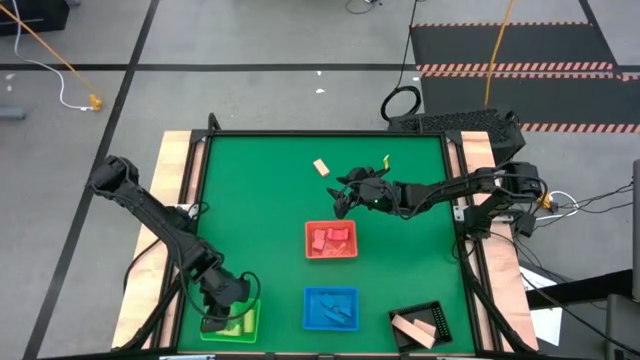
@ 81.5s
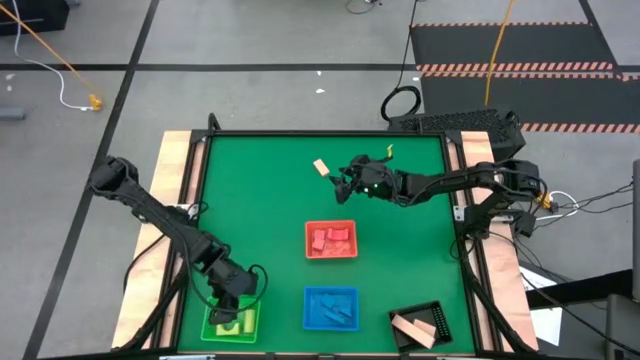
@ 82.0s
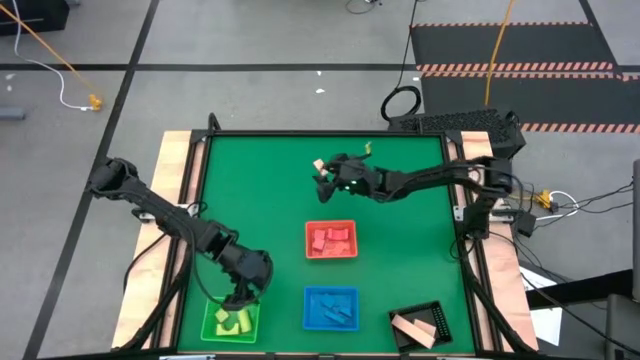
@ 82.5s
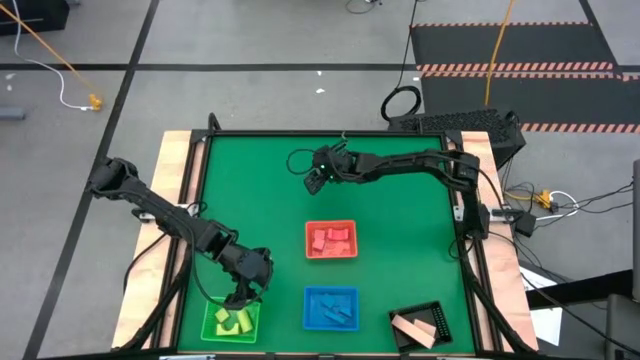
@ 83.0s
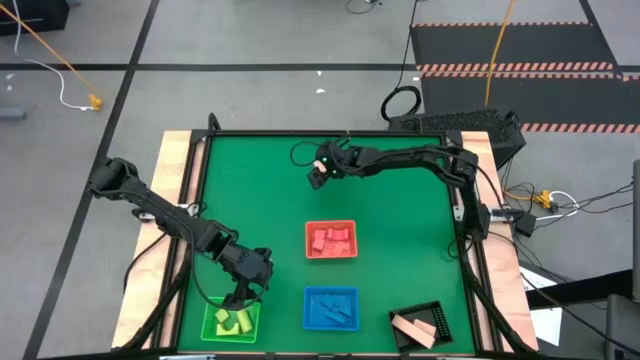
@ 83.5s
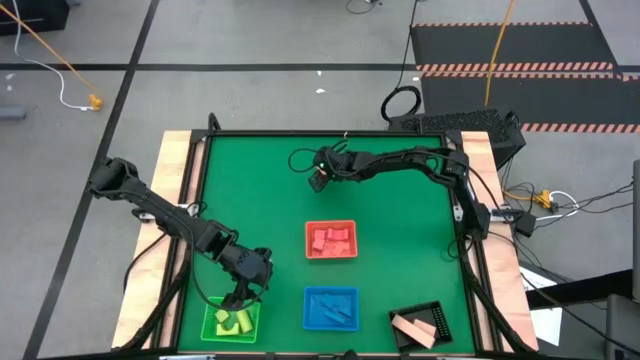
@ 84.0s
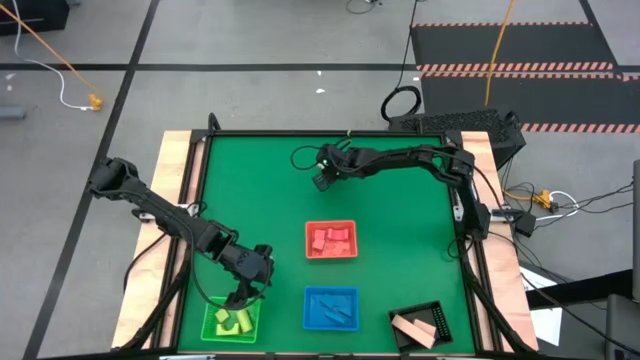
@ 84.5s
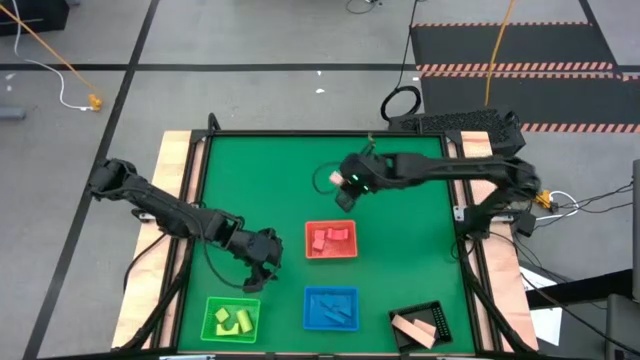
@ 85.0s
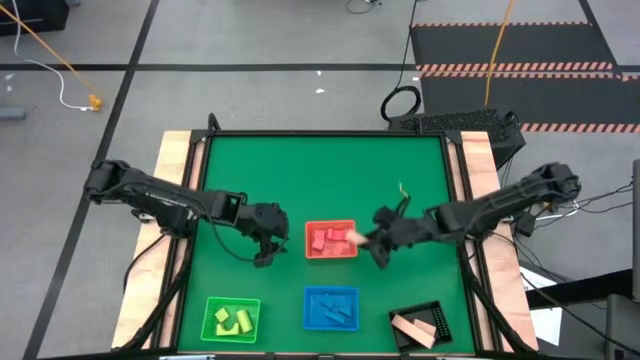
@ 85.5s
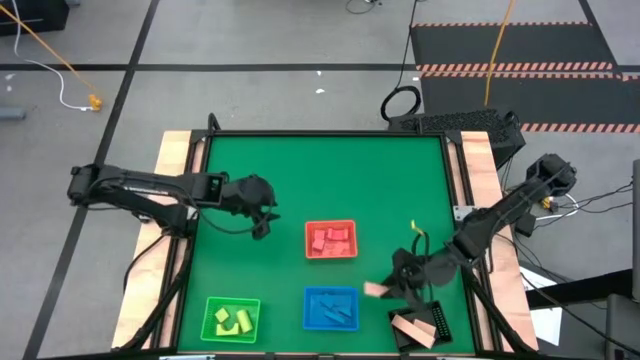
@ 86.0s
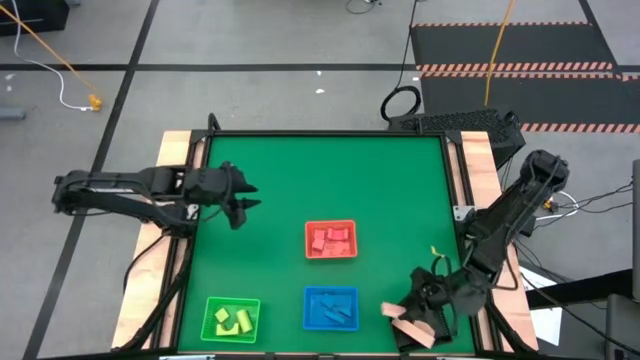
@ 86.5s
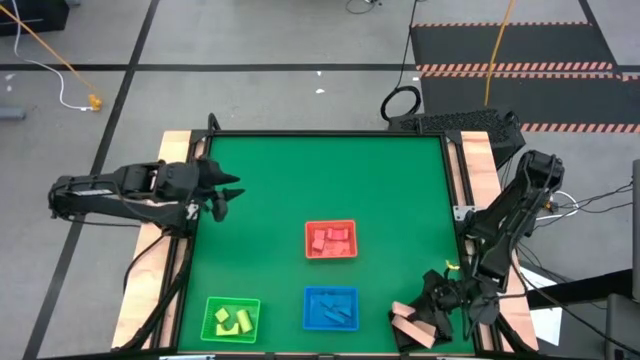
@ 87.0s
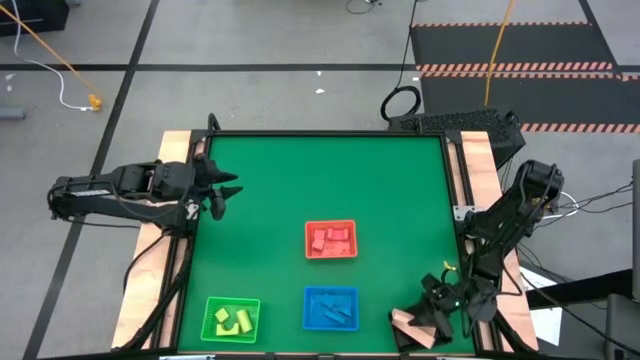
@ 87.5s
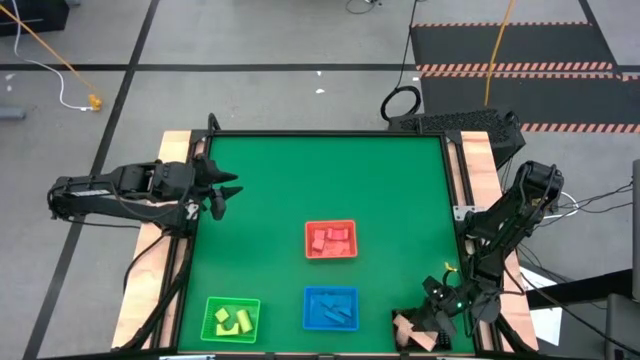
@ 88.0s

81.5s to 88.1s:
Task: Sort & place blocks by color
Put the brown block into the black bin

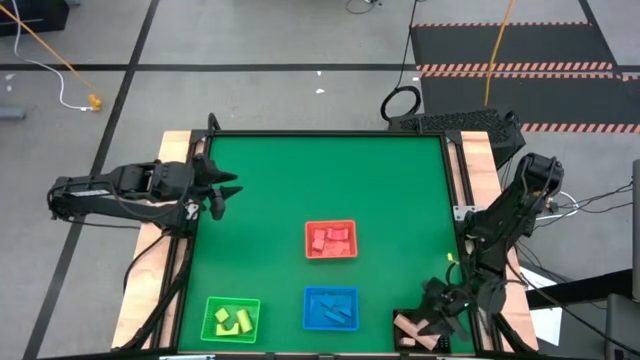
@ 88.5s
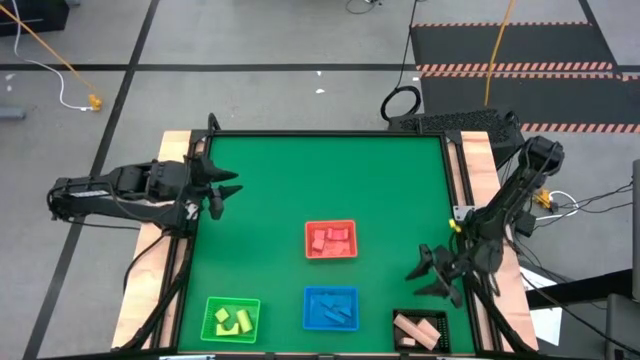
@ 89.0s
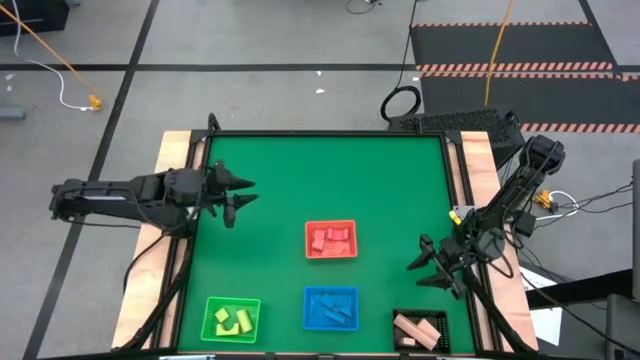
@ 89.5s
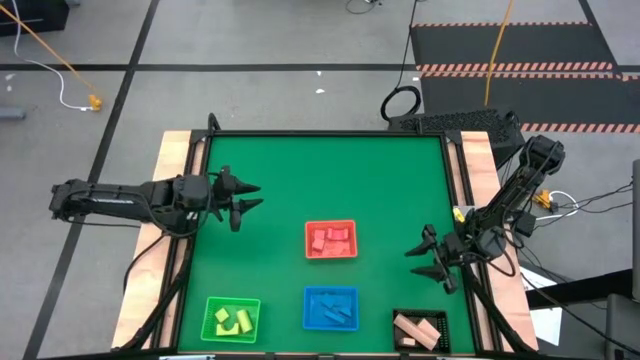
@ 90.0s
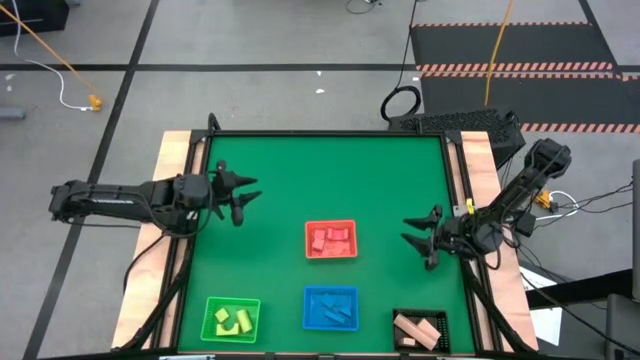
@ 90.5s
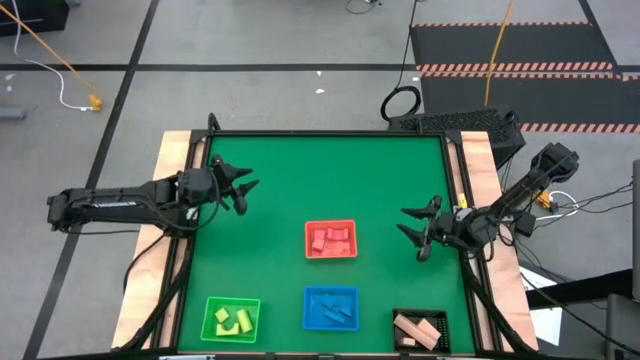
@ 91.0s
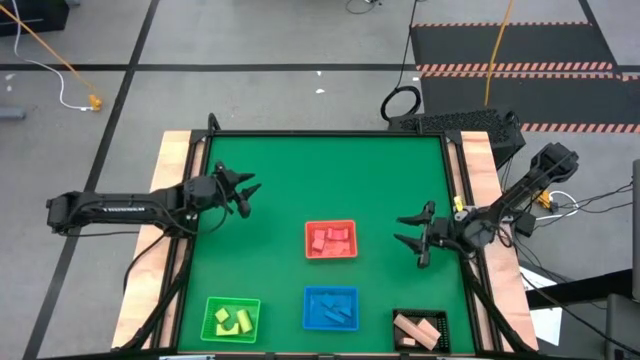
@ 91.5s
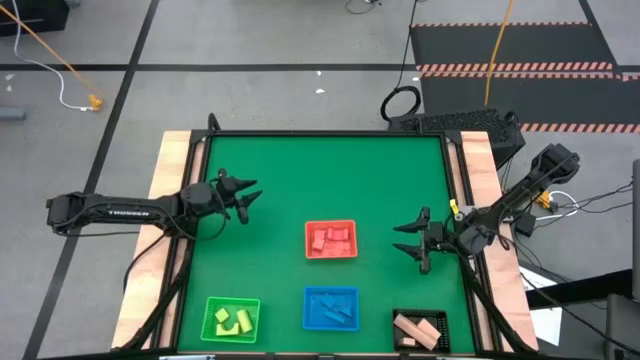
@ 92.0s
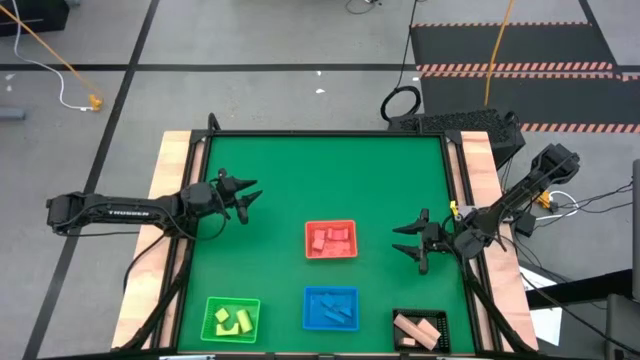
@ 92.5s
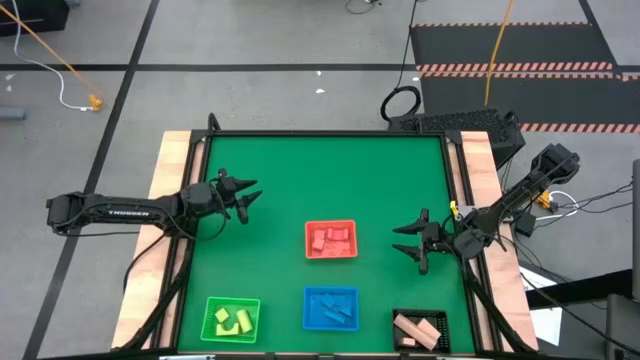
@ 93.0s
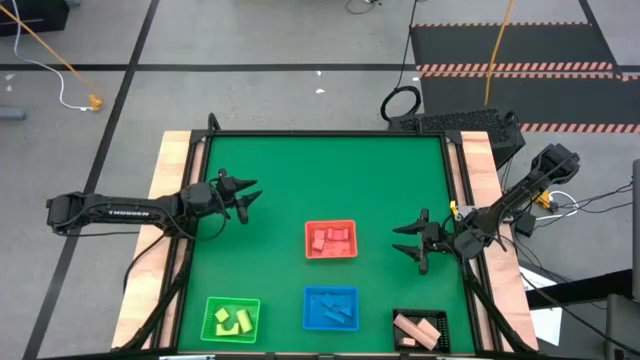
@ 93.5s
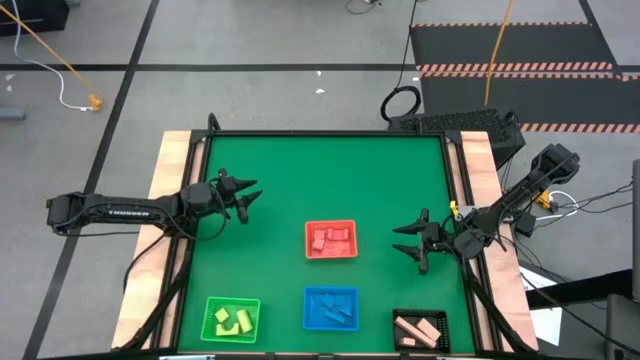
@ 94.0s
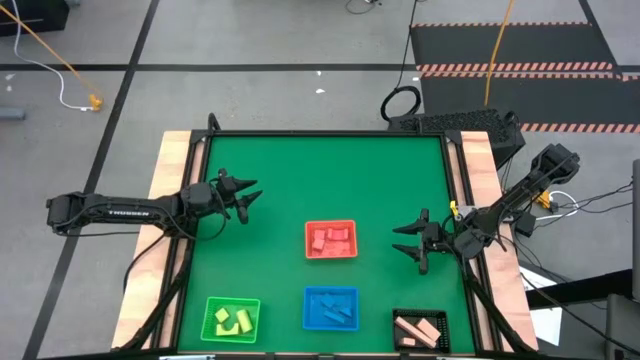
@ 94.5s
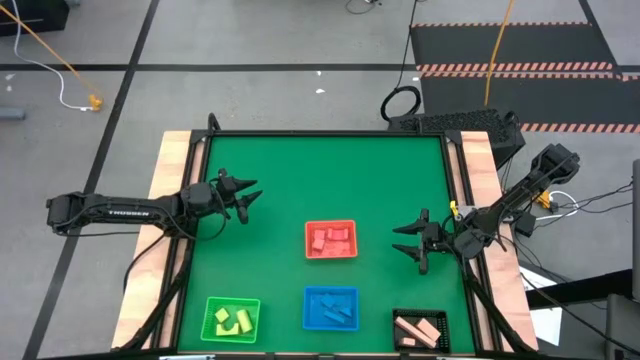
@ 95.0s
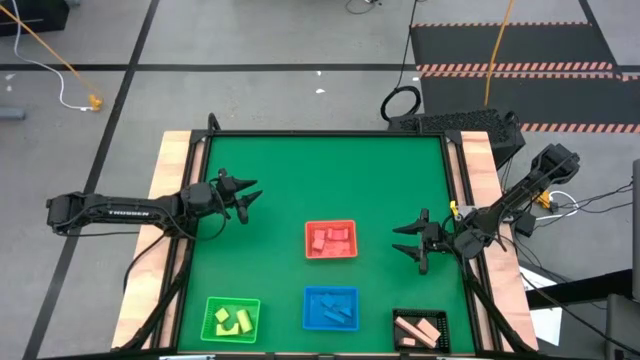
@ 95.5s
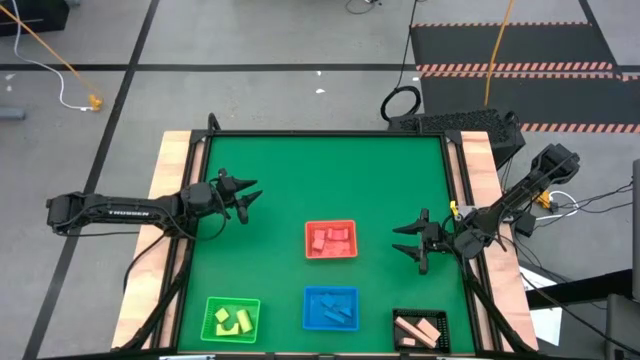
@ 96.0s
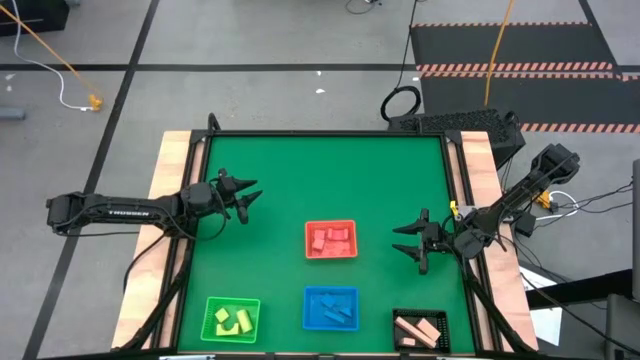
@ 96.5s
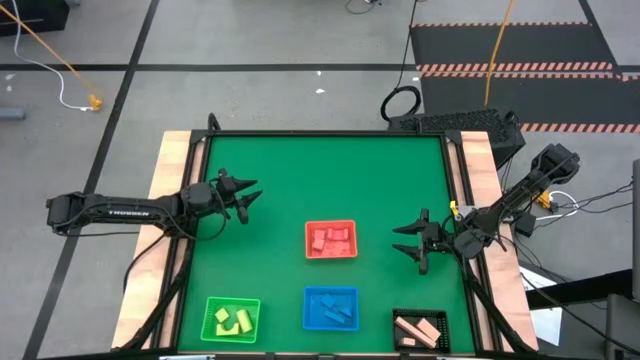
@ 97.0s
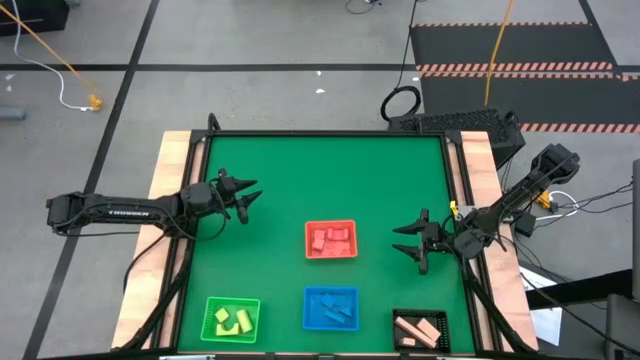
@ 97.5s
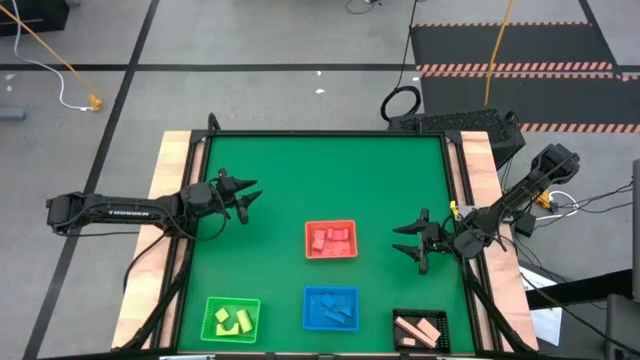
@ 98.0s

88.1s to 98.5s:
Return to Home Position

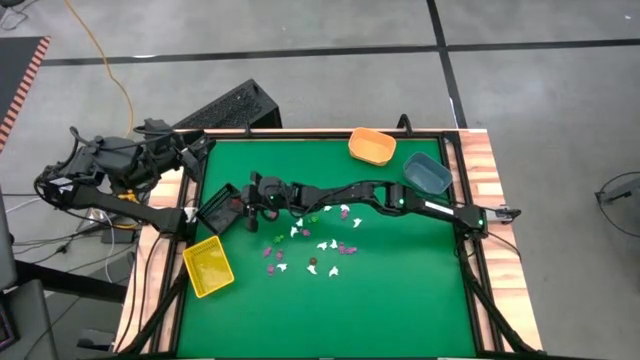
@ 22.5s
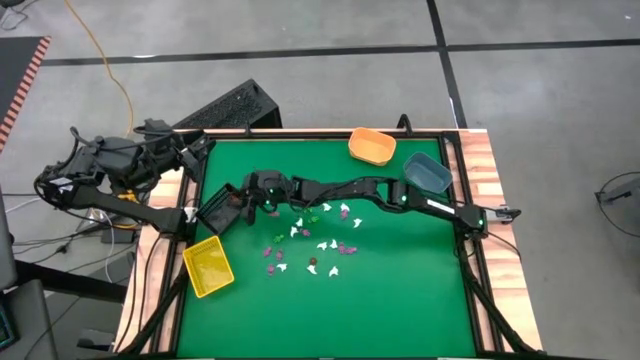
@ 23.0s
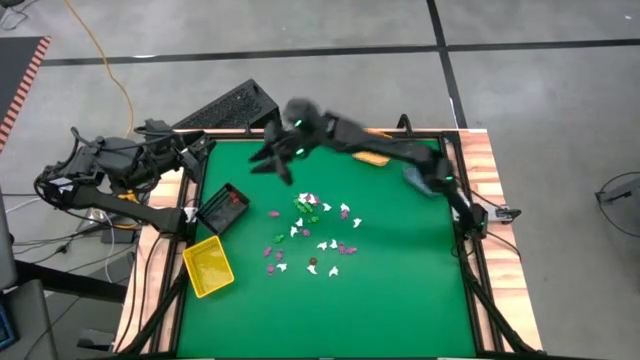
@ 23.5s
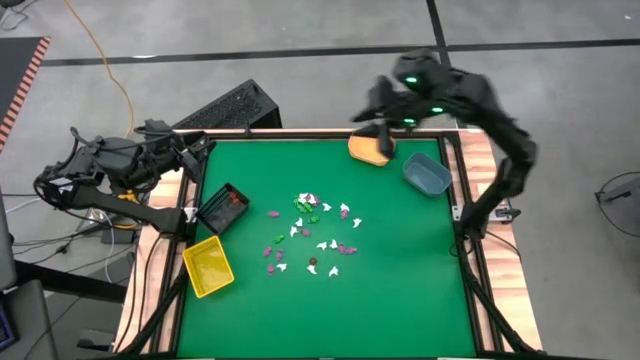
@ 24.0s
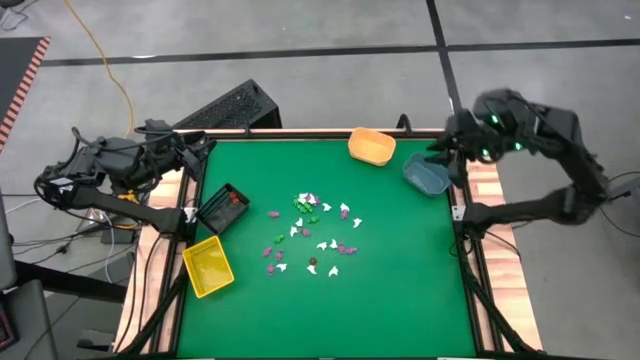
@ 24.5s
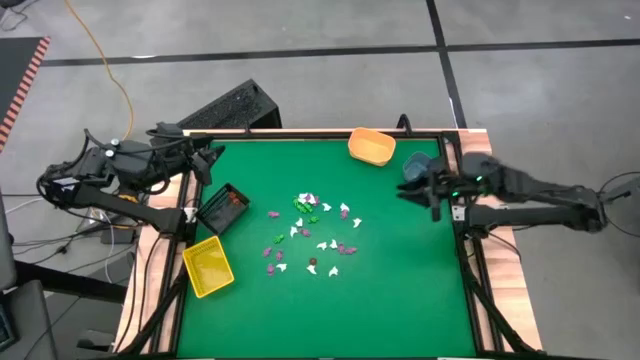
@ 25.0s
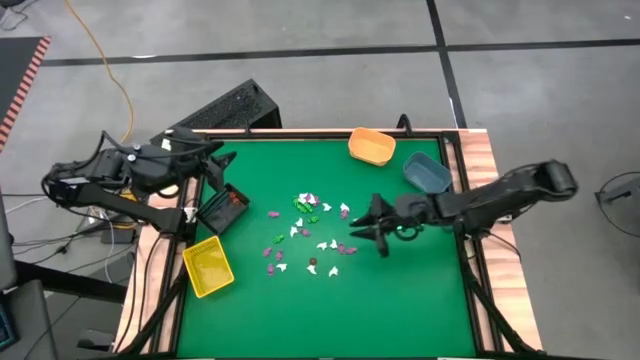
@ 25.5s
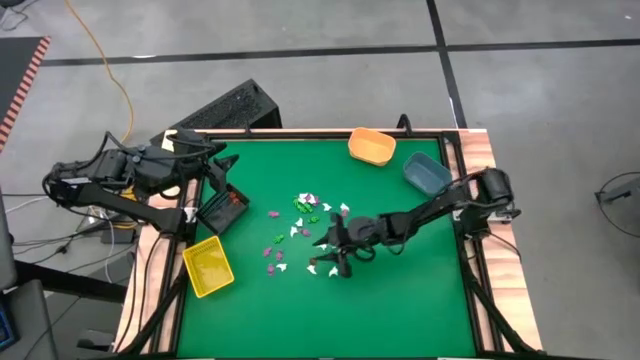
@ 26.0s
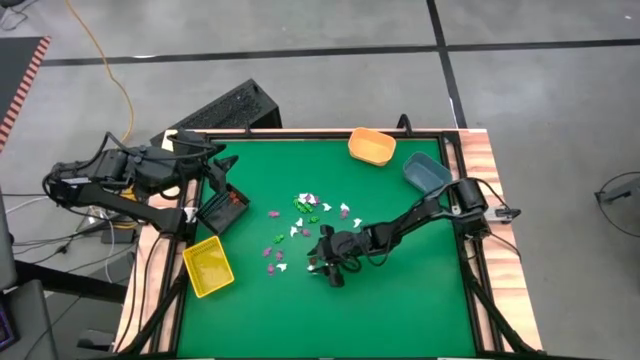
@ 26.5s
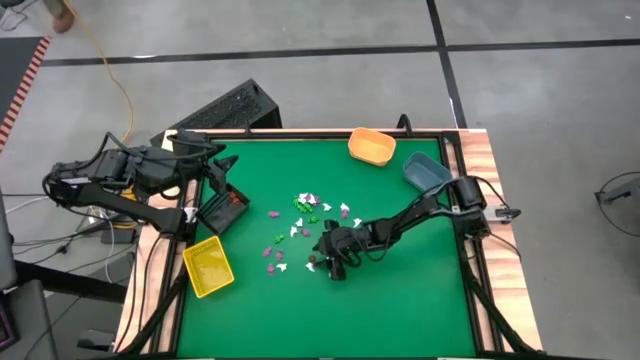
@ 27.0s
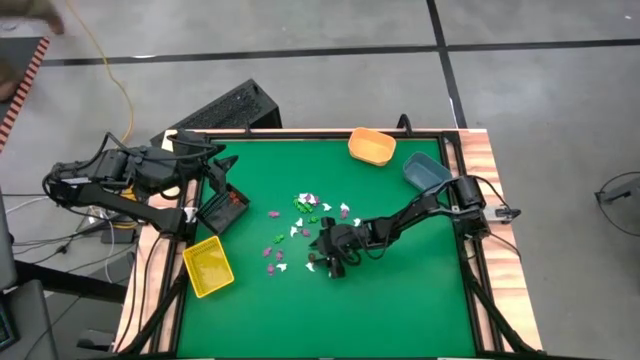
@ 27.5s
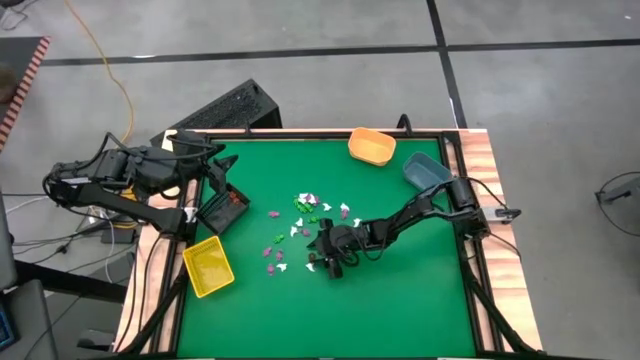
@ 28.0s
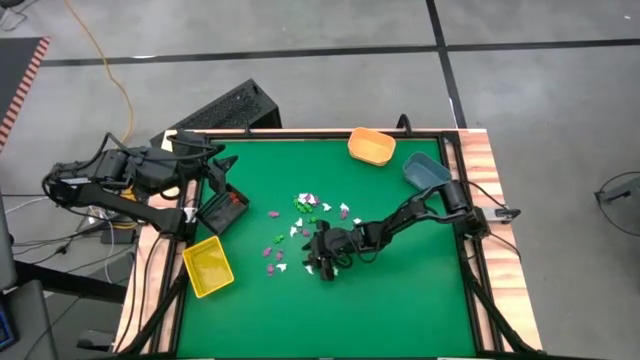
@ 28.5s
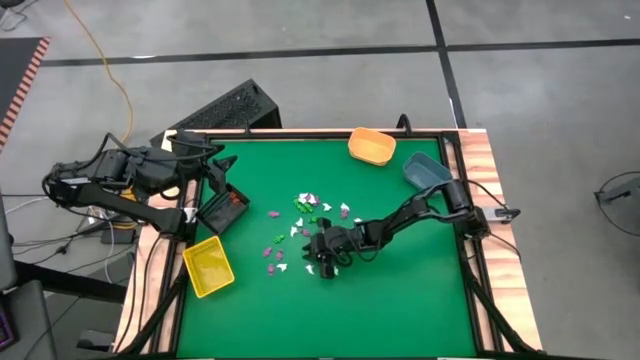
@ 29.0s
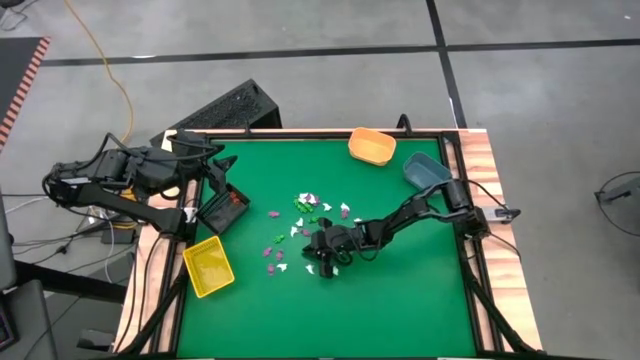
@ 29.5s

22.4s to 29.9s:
Task: Sort Halloween decoration
Put the orange pumpkin toy into the black bin
